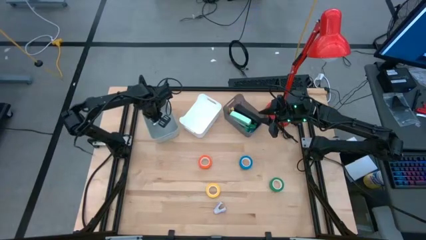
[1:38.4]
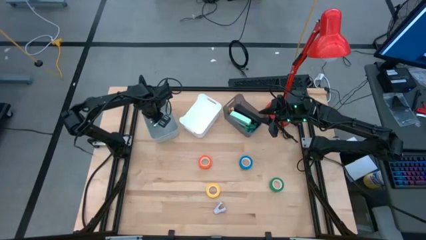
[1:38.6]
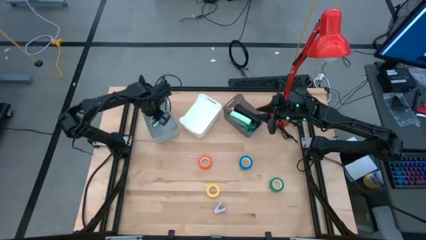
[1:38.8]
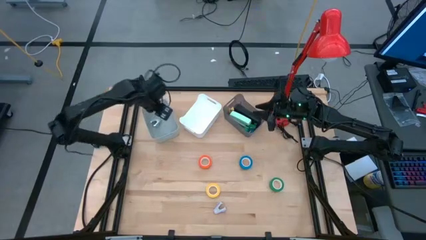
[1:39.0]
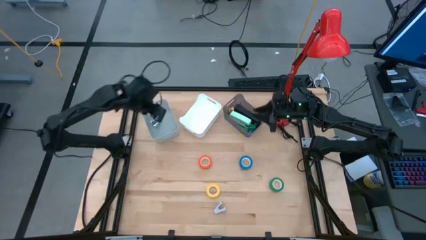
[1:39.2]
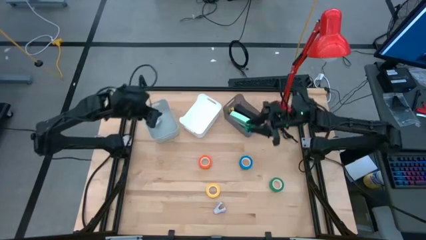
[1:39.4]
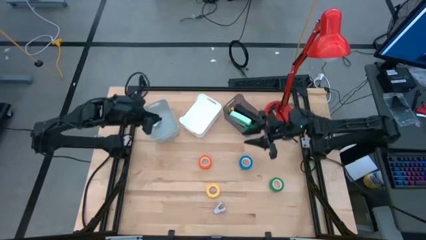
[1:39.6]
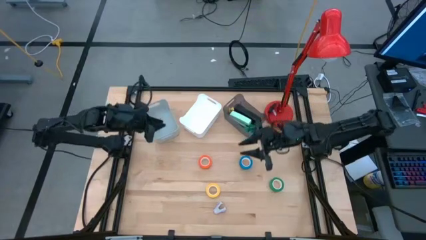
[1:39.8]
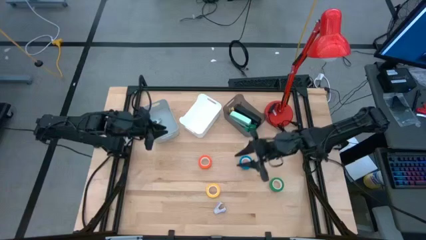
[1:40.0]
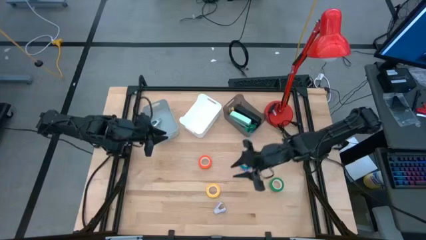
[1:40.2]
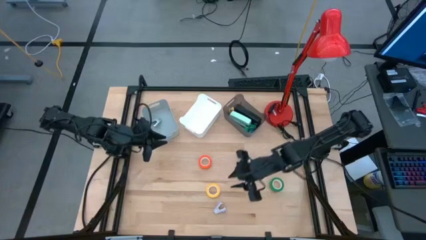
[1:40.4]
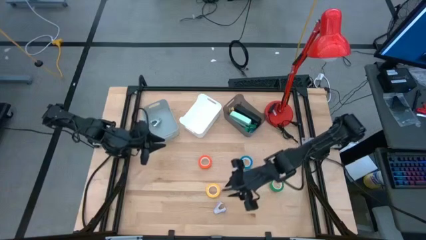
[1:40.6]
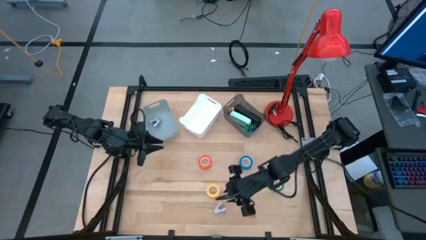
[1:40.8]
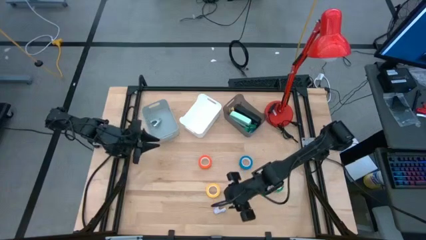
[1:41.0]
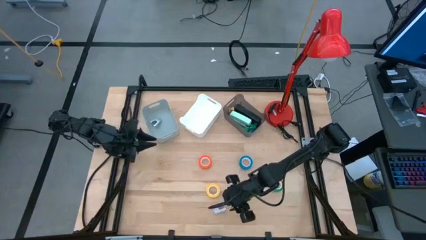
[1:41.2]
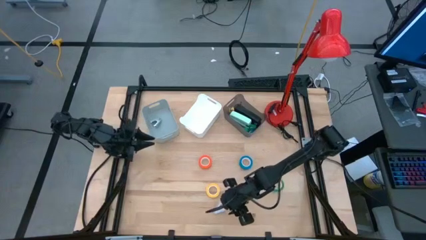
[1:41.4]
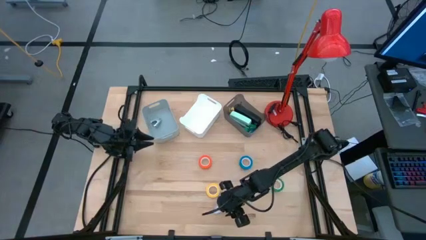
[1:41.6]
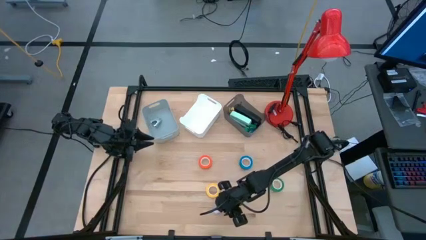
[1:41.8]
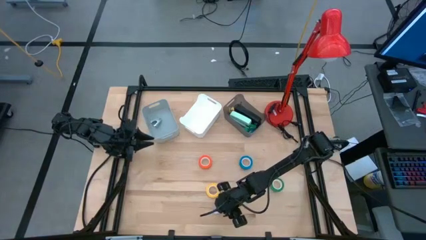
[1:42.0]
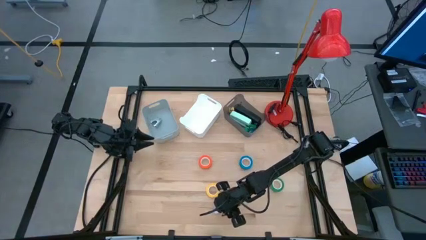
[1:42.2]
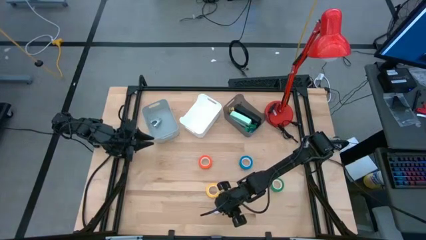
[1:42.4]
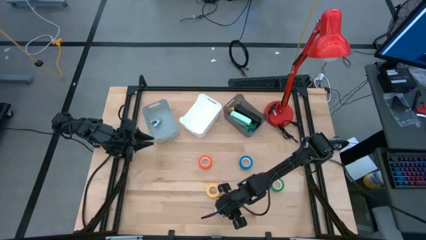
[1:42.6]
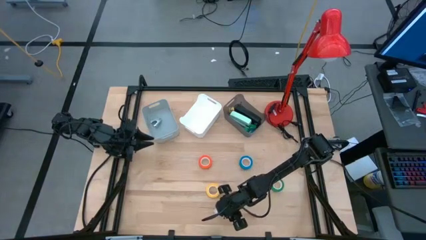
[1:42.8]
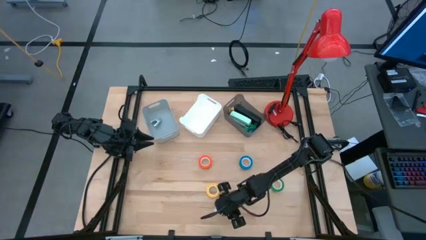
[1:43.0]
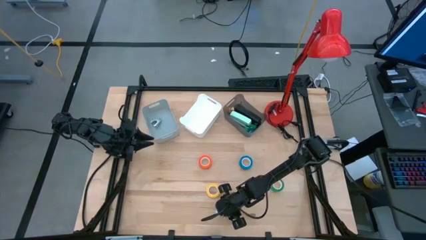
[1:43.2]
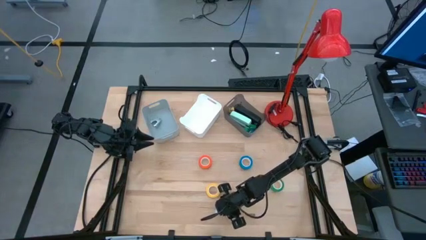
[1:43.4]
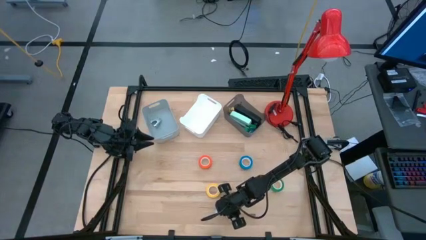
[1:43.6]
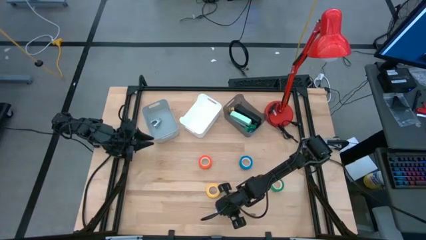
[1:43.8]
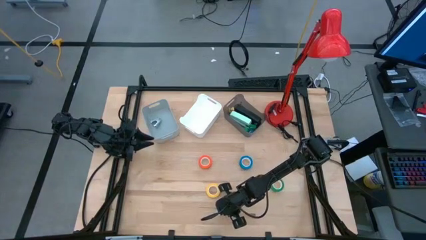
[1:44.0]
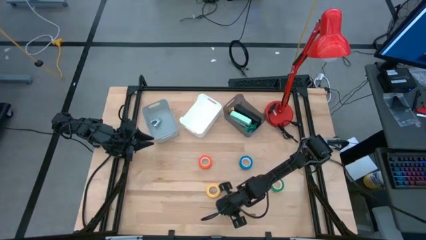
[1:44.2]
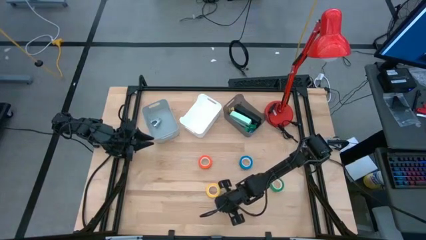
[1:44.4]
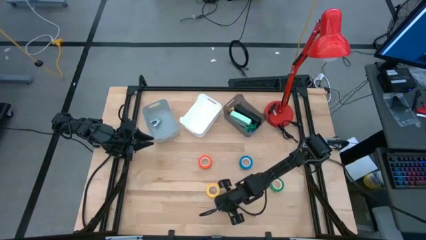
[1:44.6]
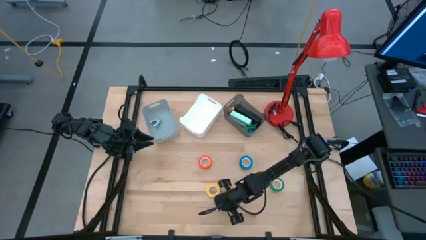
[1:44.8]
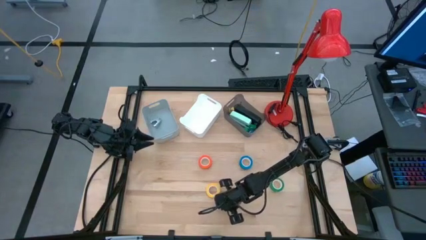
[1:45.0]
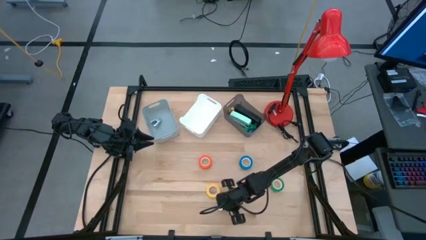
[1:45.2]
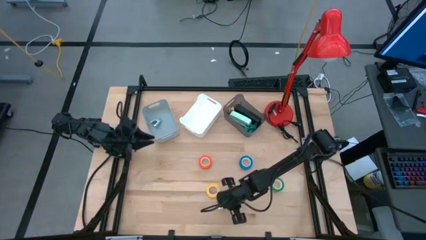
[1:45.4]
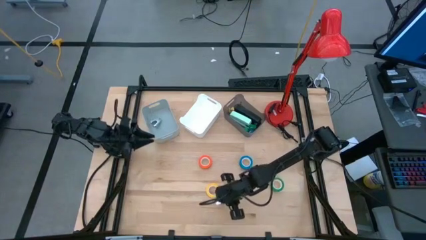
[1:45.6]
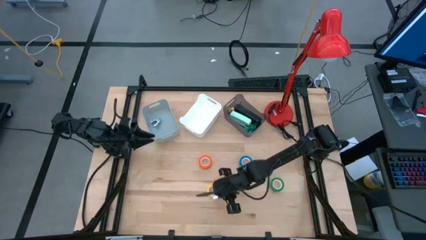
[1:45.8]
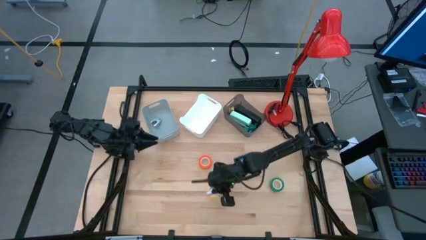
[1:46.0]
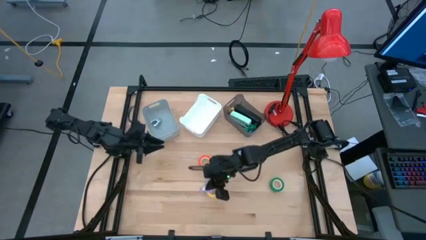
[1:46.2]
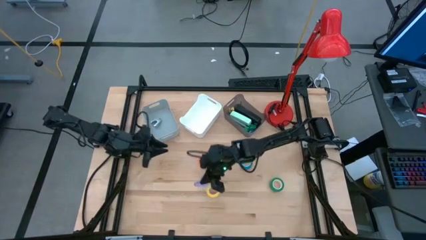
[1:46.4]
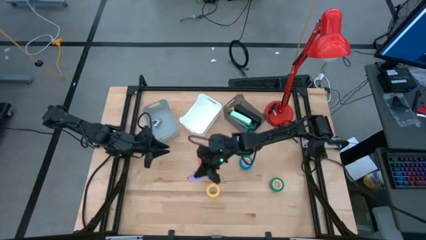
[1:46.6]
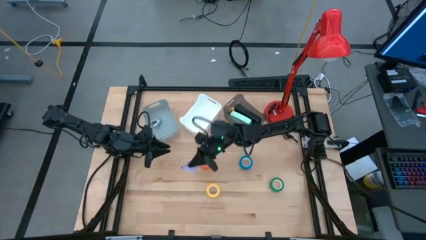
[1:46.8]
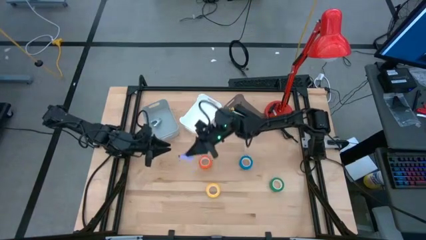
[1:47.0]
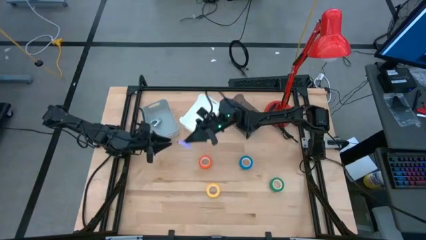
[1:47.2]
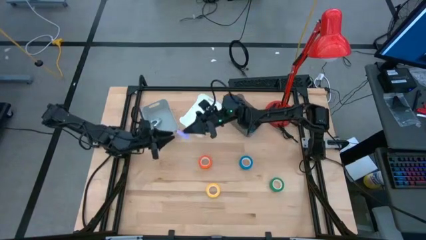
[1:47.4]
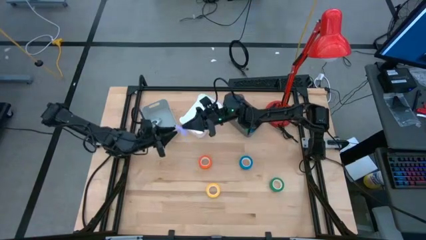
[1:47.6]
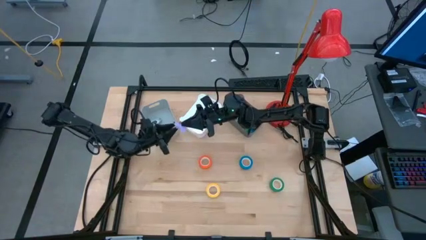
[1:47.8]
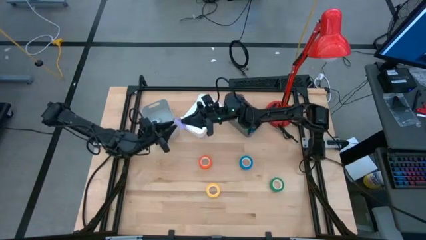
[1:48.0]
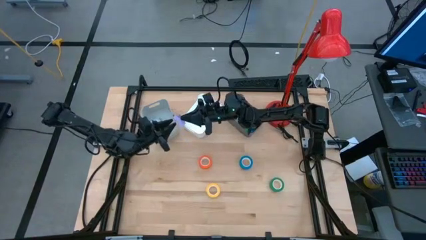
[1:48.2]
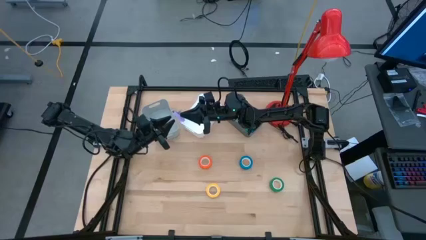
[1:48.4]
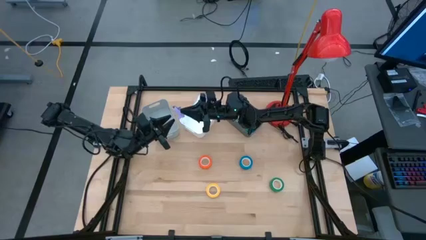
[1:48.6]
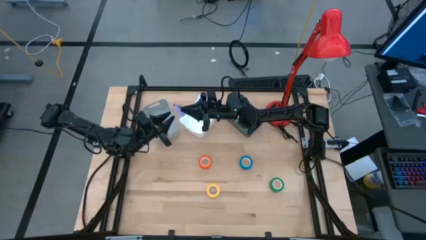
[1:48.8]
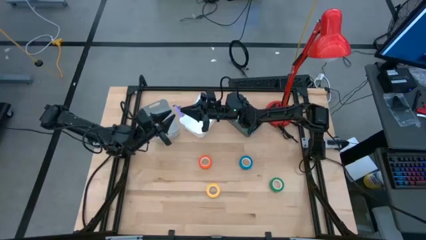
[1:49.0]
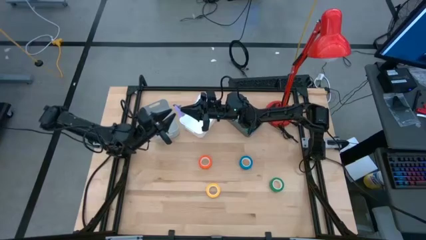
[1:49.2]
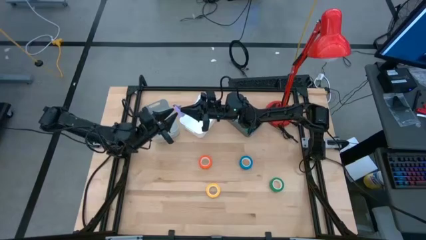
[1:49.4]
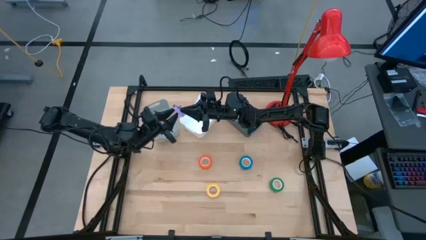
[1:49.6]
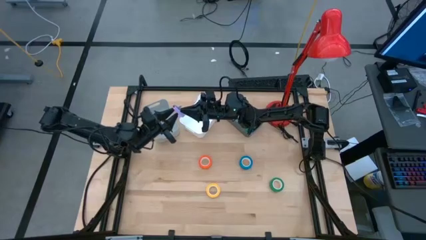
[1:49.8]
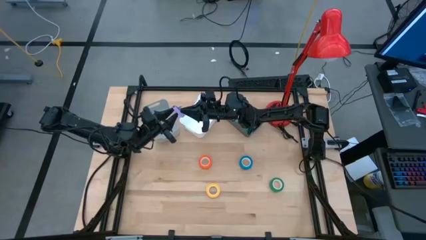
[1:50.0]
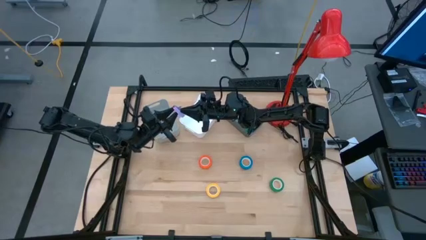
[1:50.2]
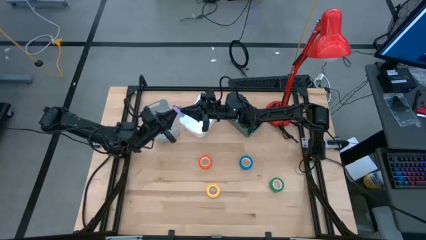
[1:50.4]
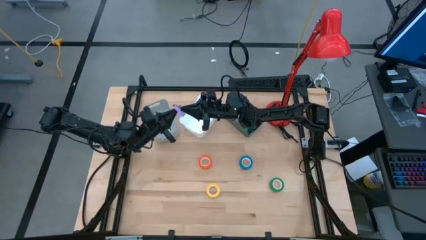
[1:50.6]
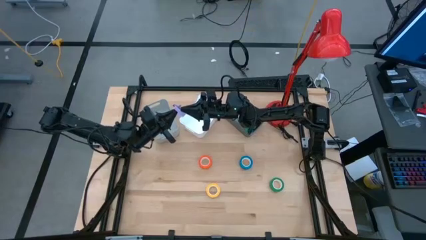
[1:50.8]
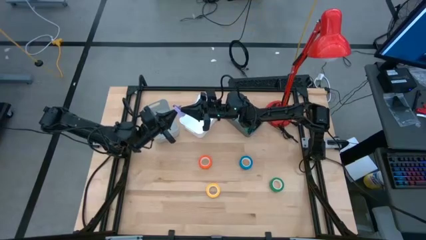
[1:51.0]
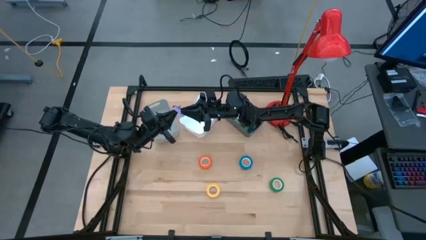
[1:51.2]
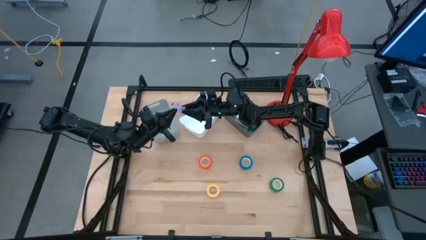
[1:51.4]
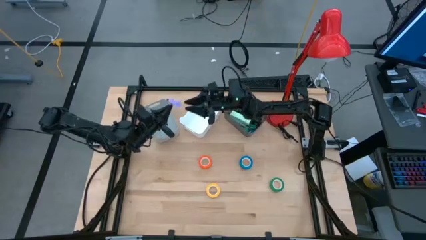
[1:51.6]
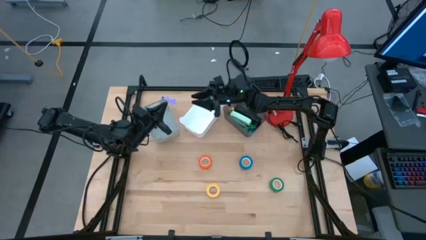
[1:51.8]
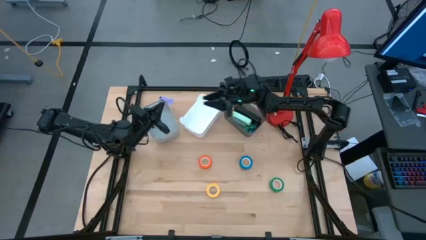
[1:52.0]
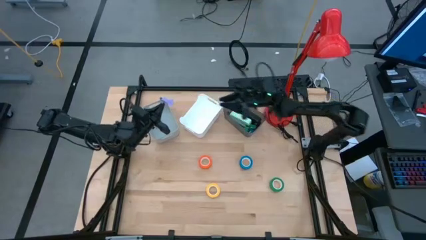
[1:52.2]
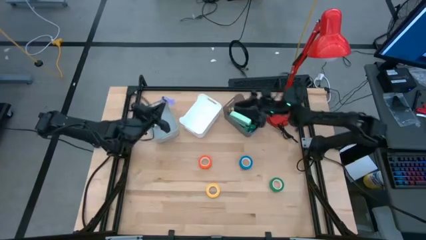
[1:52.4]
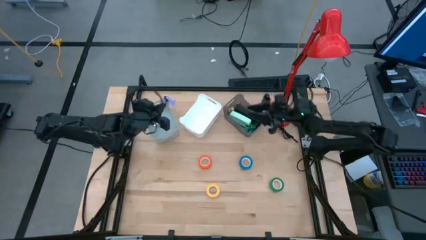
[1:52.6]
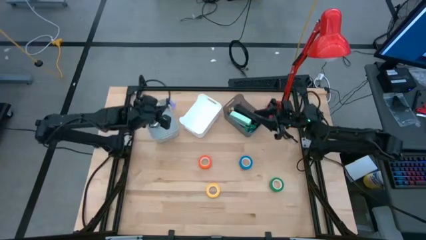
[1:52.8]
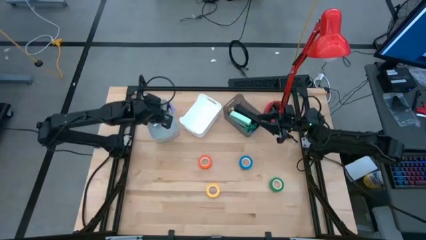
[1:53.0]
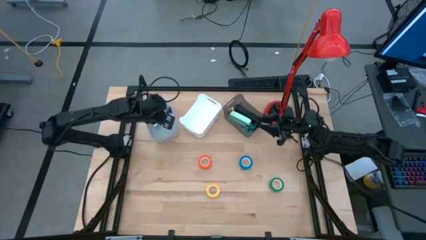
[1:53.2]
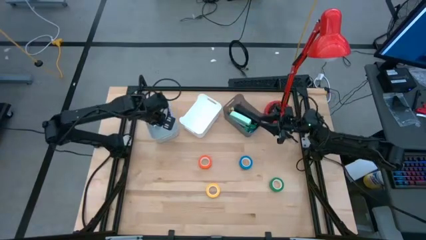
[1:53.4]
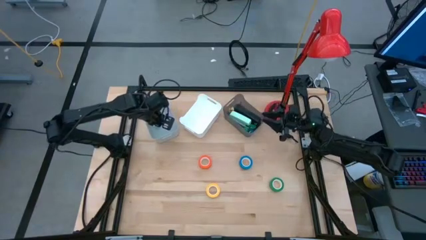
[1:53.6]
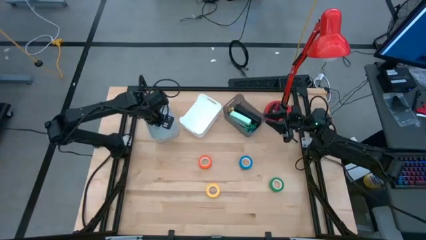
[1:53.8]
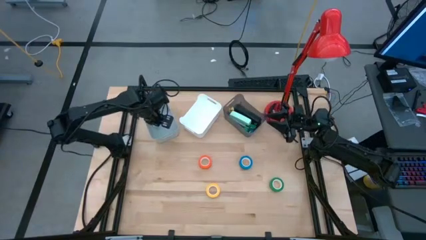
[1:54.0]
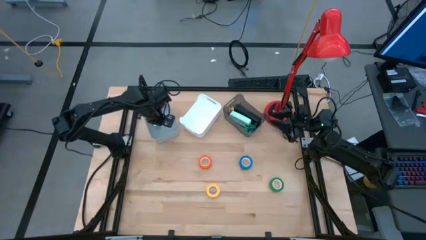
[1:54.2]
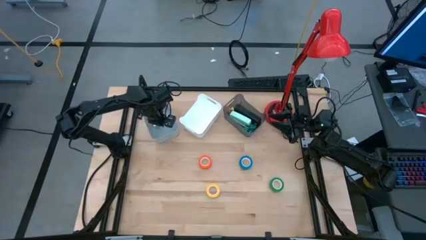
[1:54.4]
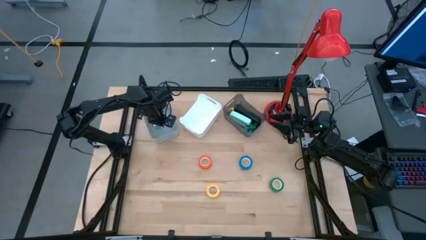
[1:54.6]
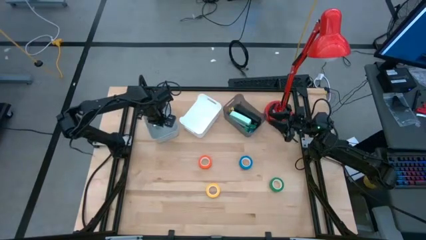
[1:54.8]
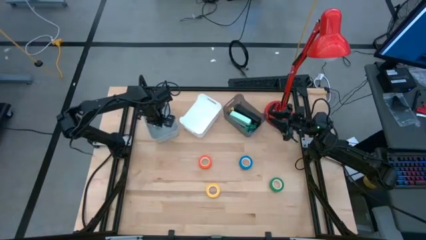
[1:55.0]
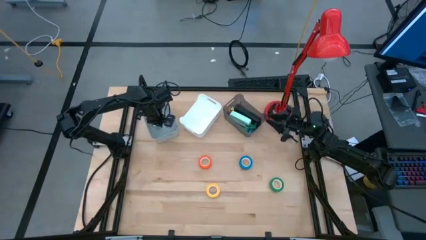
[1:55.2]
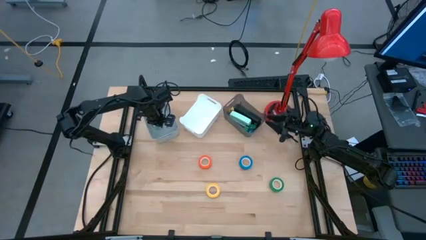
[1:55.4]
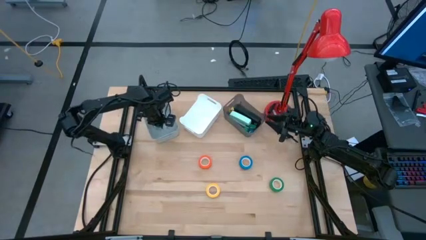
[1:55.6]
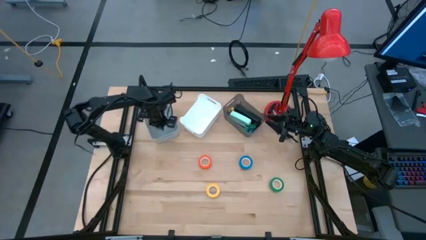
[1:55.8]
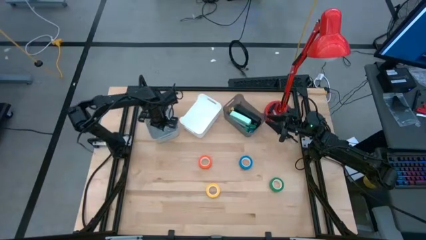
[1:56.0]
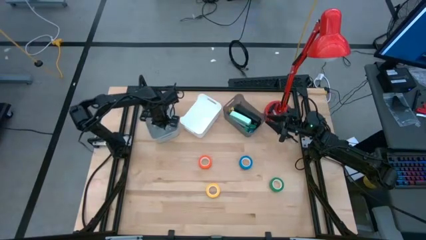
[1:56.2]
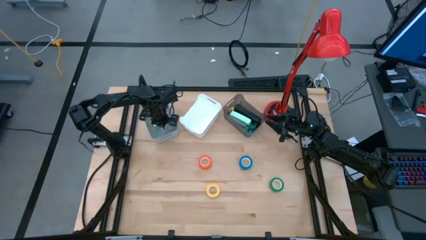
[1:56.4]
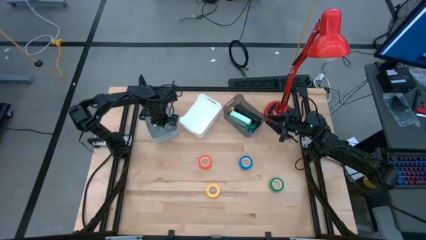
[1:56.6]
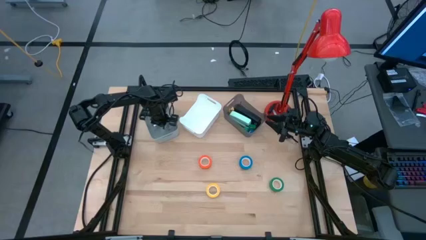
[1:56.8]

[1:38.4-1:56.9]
Task: Pick and place Stapler, Stapler remover, tape
Put the purple staple remover into the gray bin
